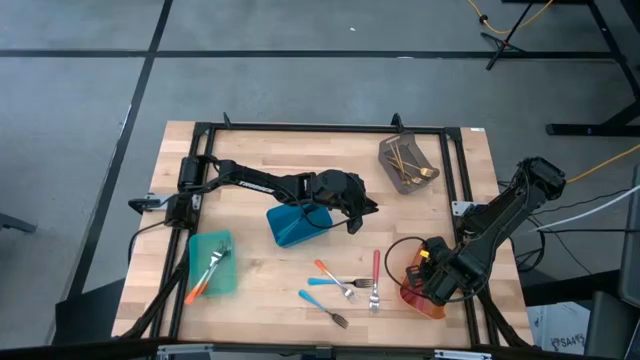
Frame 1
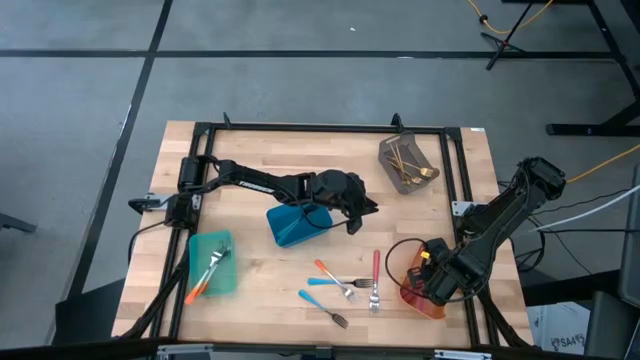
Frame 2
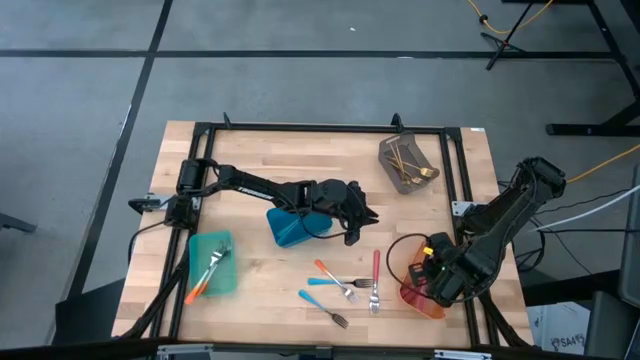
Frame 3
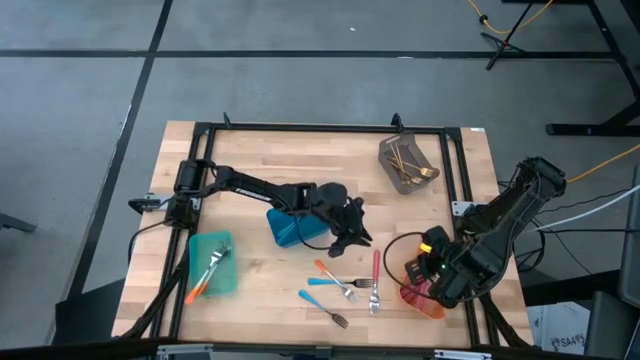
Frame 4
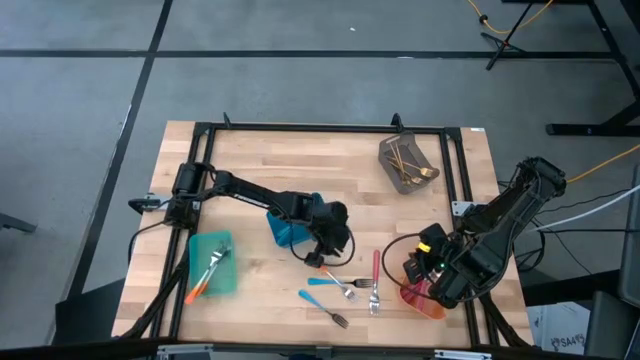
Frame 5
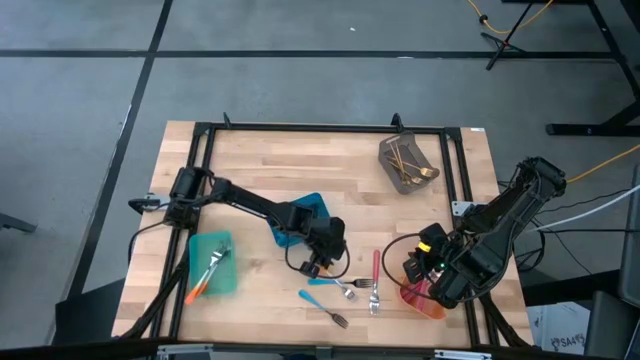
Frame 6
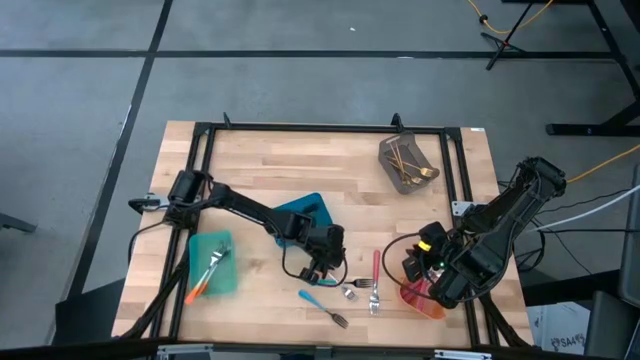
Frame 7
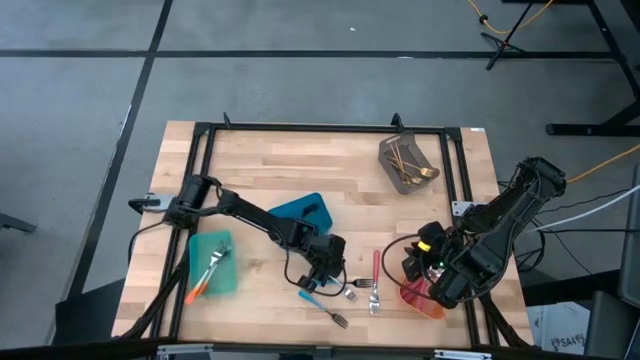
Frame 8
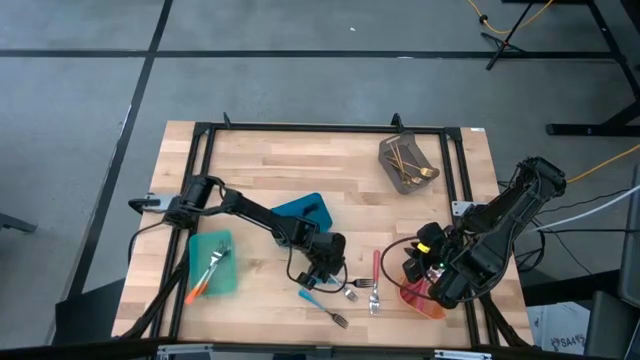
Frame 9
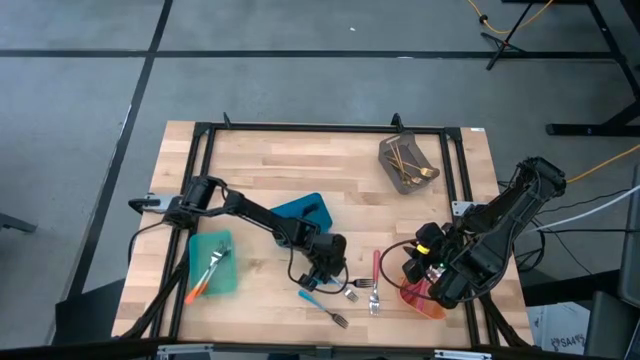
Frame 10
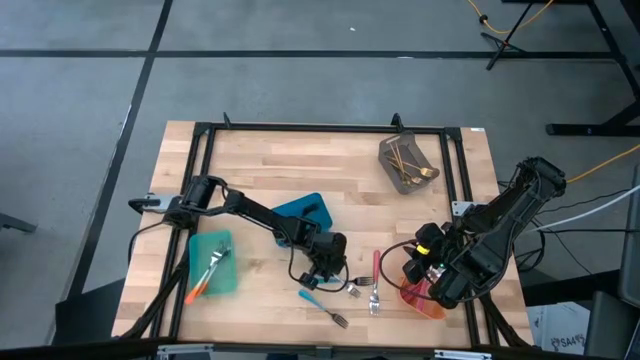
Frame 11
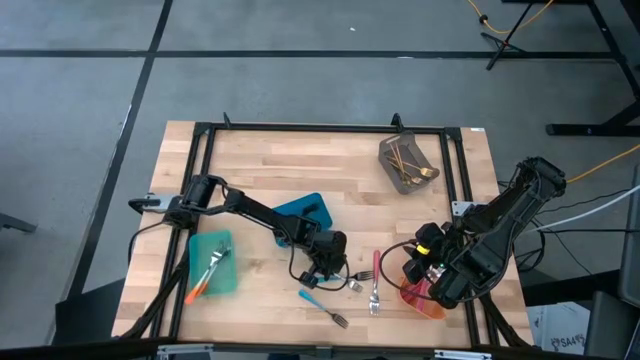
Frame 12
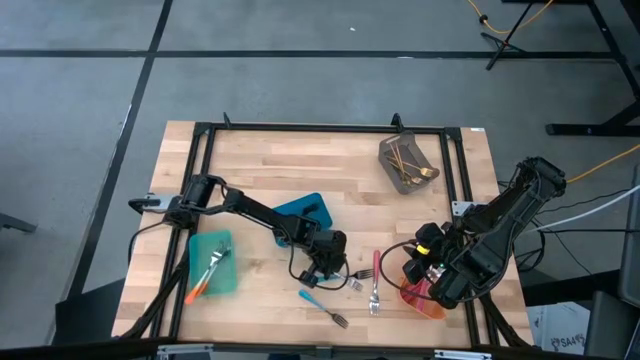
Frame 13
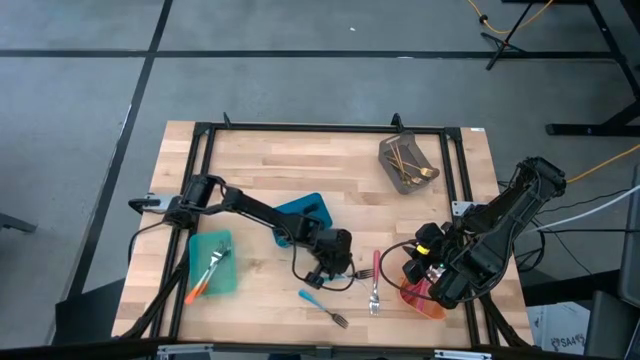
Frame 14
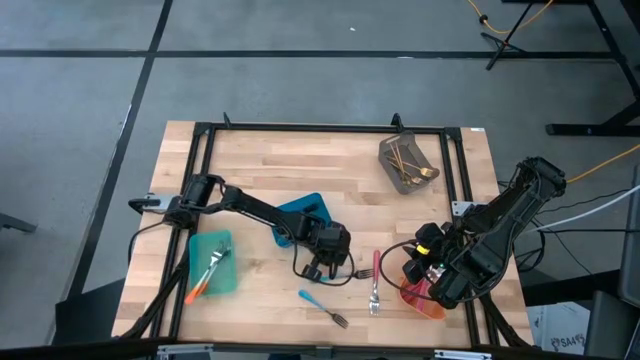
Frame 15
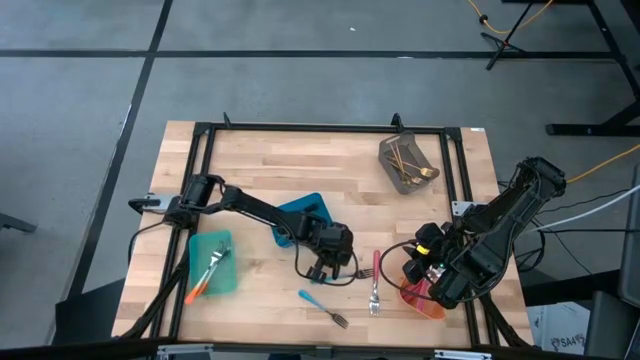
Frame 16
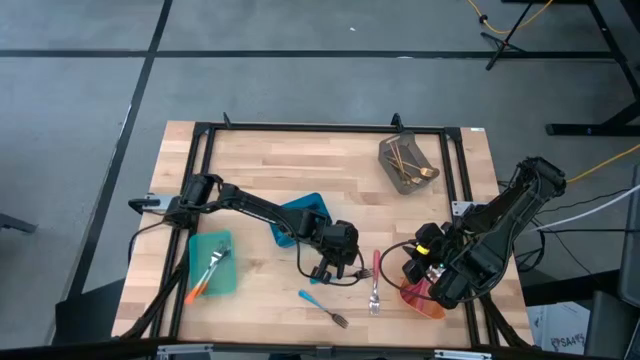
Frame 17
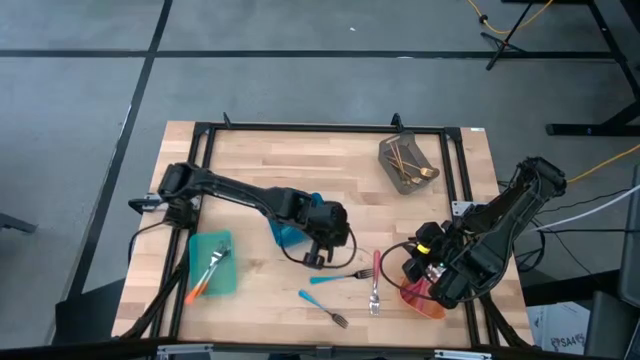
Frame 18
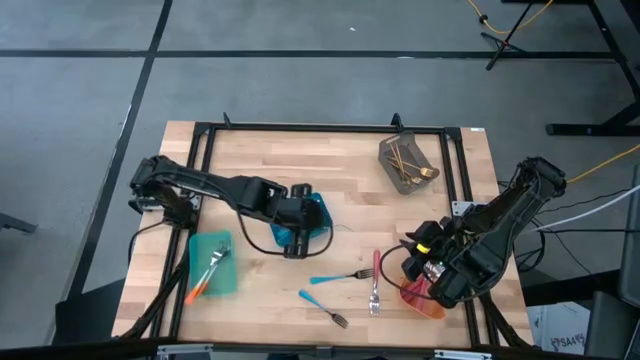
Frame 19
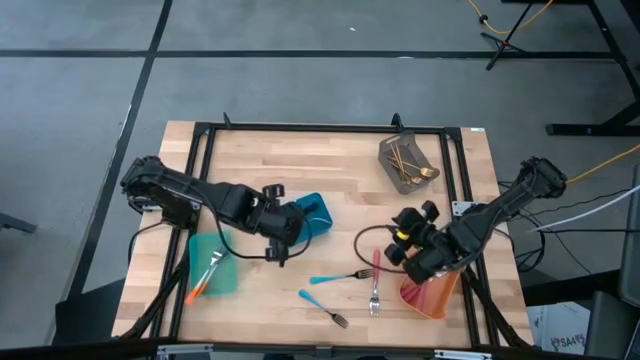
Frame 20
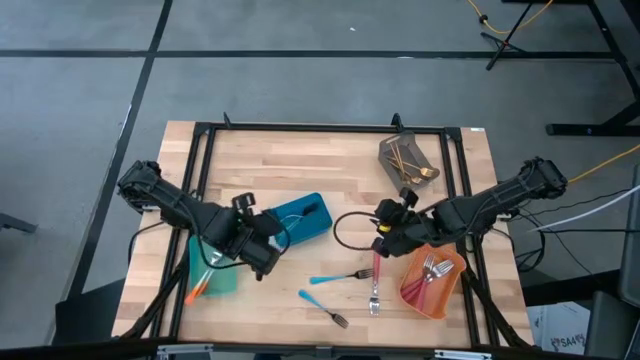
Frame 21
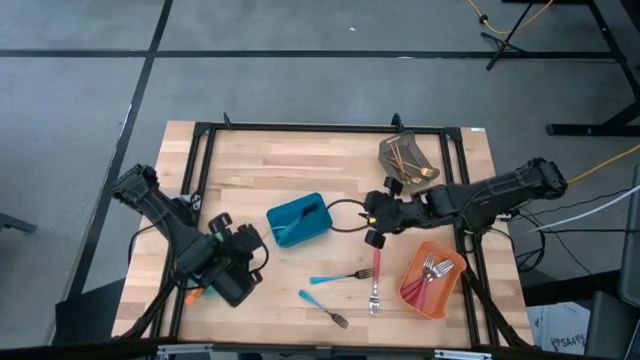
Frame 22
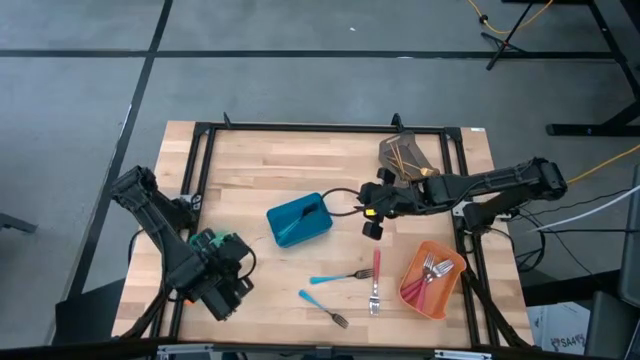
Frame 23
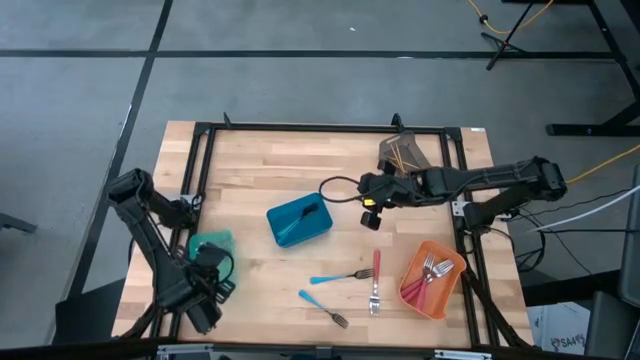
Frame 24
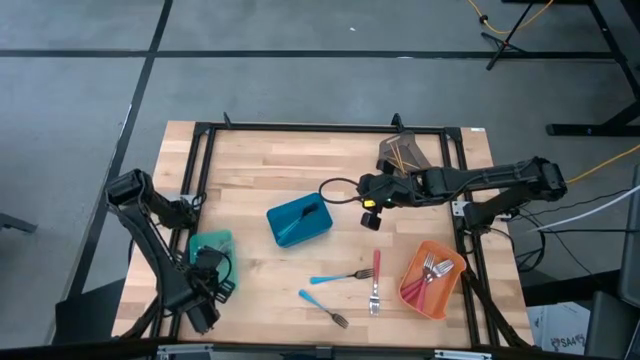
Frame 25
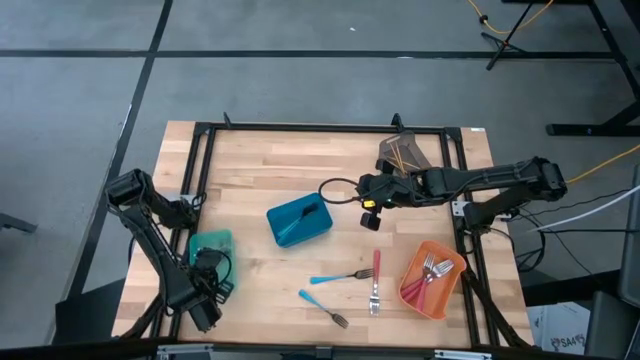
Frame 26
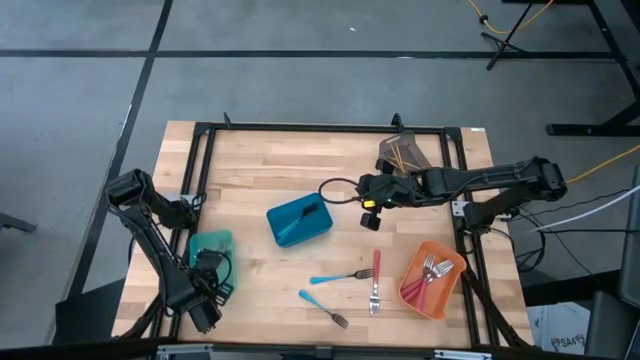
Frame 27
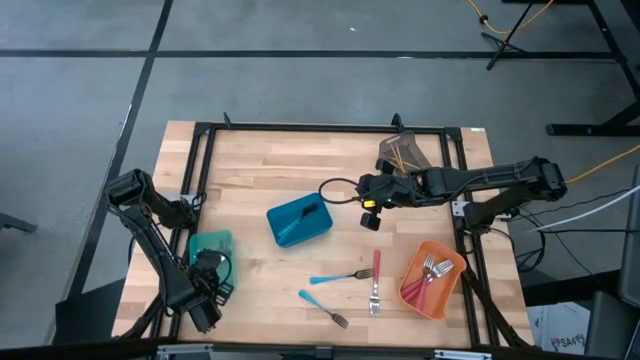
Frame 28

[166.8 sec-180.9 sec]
Task: Sort silverware by color (type)
Put the orange fork into the light blue bin

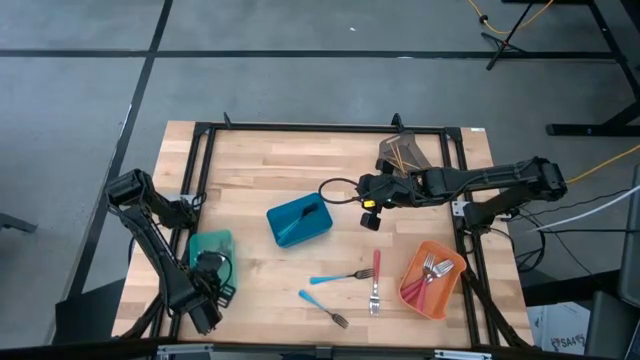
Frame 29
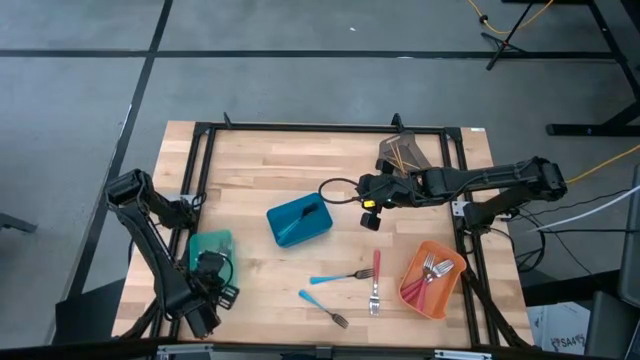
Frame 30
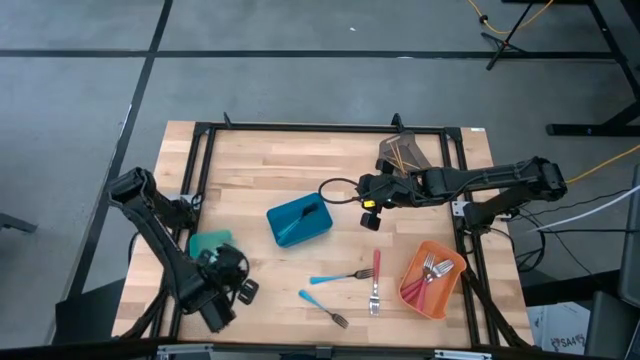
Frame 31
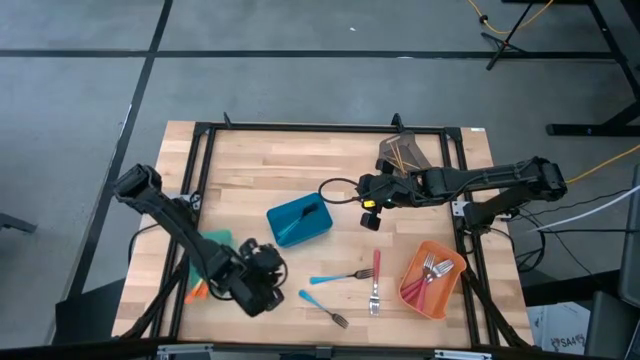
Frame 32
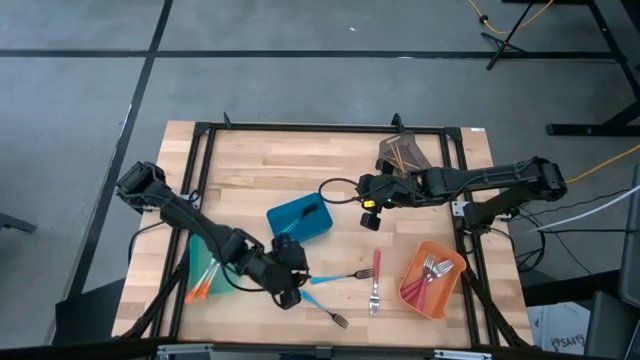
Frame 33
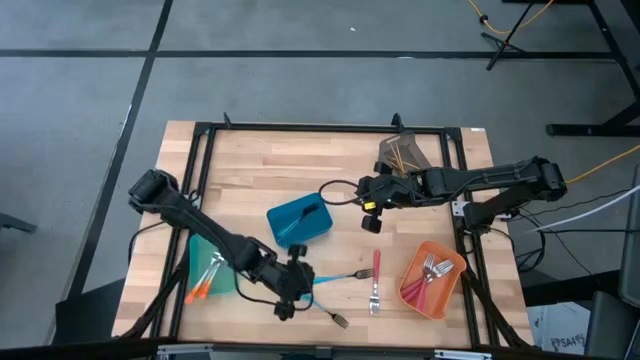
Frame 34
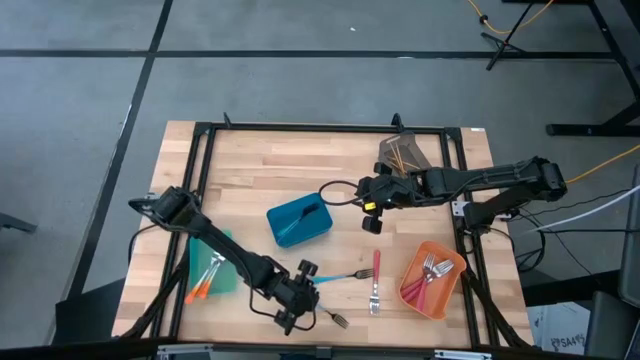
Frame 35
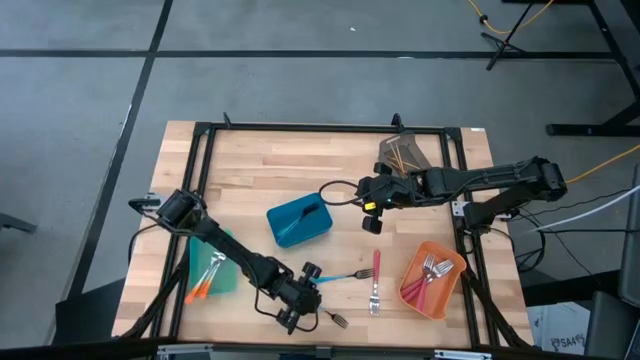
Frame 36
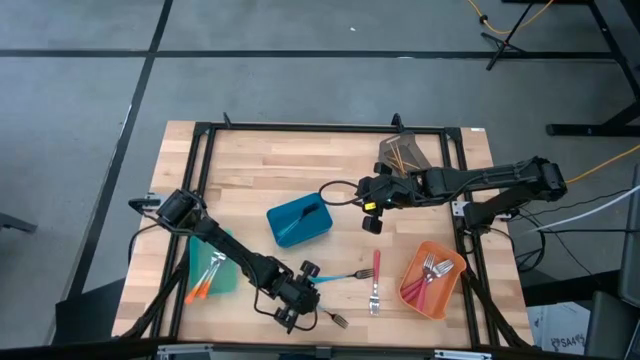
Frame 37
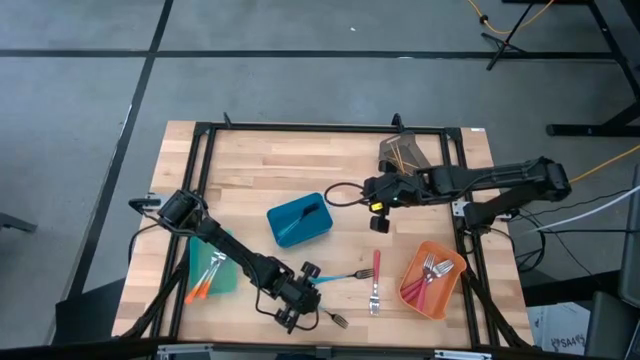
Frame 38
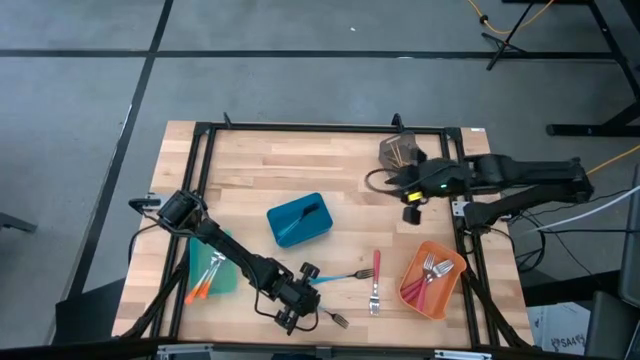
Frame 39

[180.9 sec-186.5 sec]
Put the bottom blue fork into the dark blue bin
